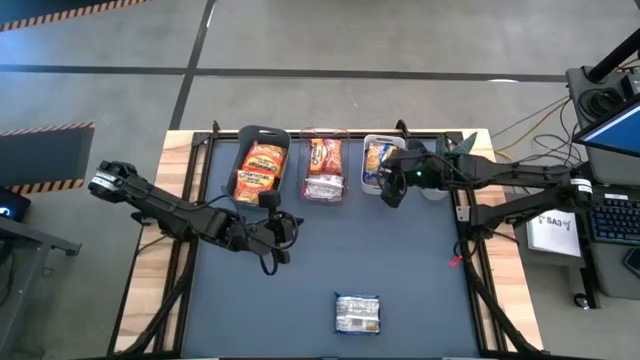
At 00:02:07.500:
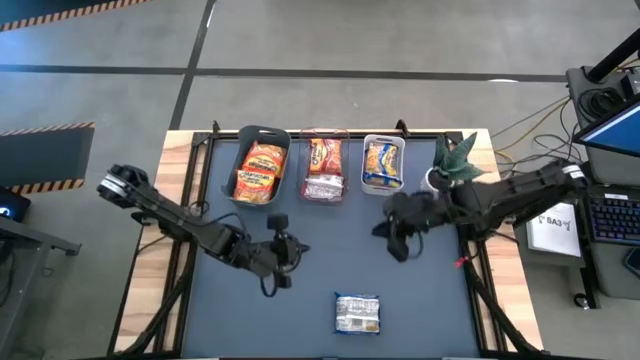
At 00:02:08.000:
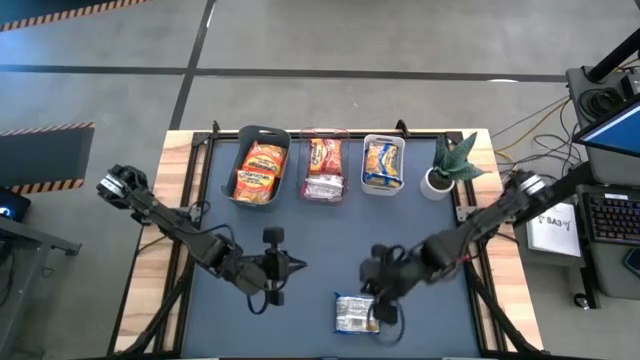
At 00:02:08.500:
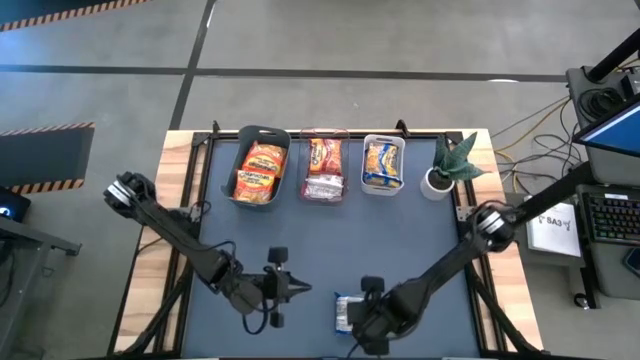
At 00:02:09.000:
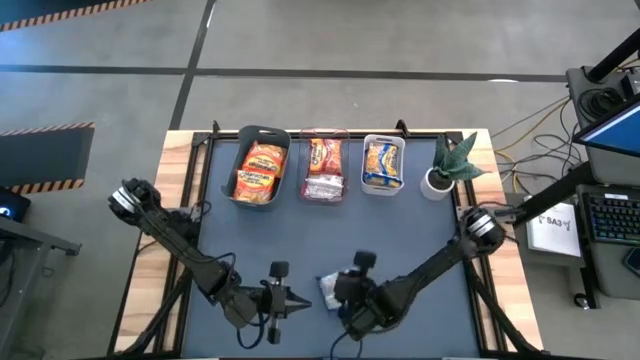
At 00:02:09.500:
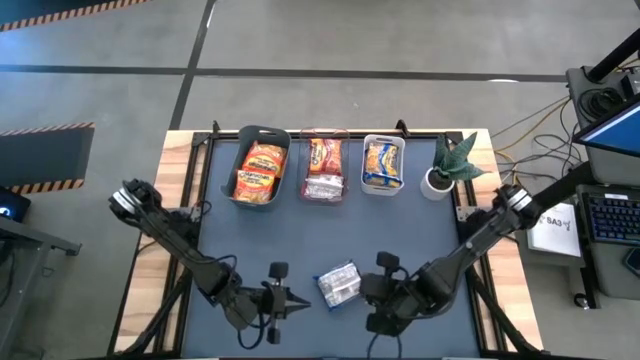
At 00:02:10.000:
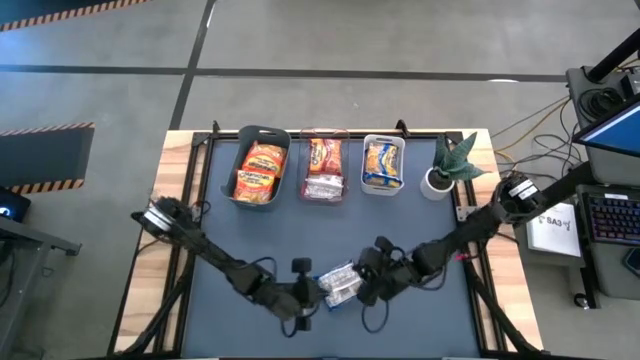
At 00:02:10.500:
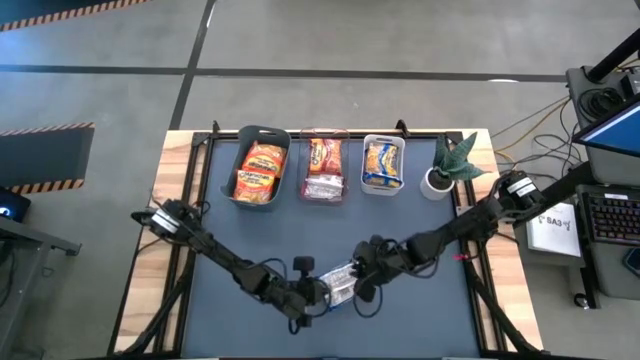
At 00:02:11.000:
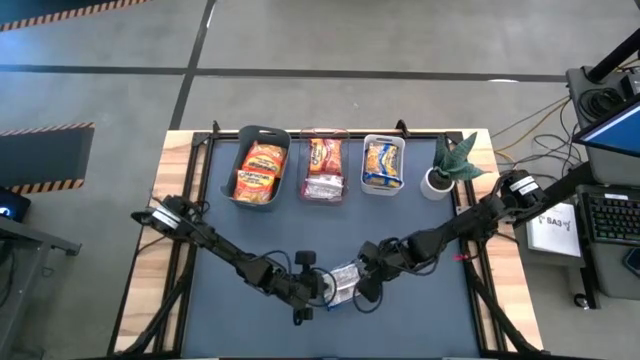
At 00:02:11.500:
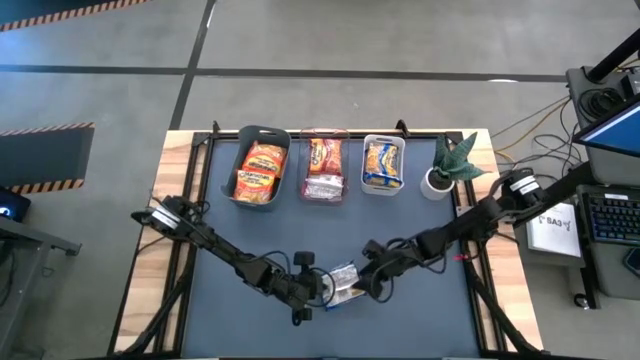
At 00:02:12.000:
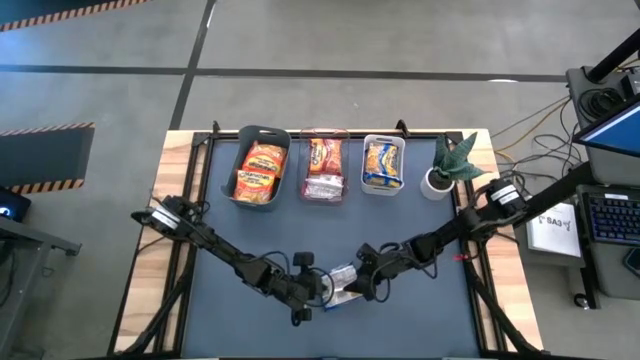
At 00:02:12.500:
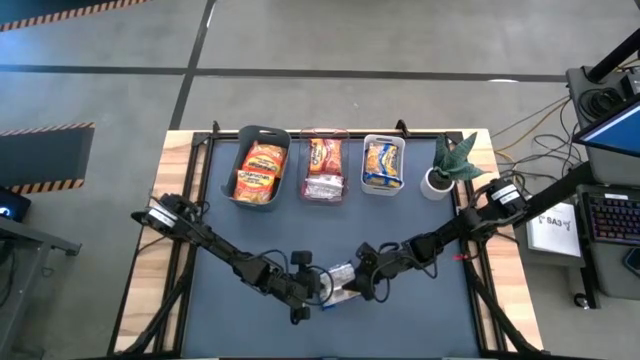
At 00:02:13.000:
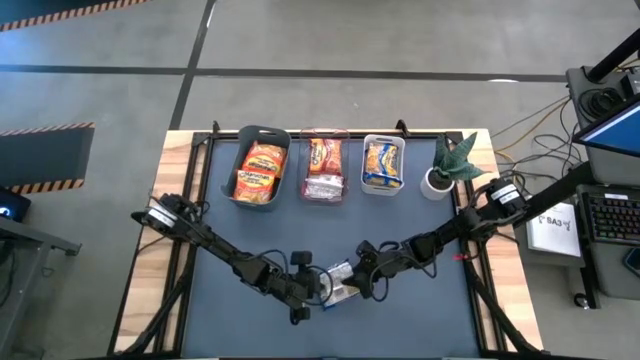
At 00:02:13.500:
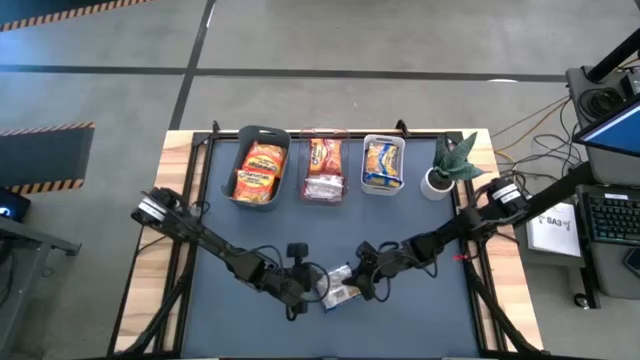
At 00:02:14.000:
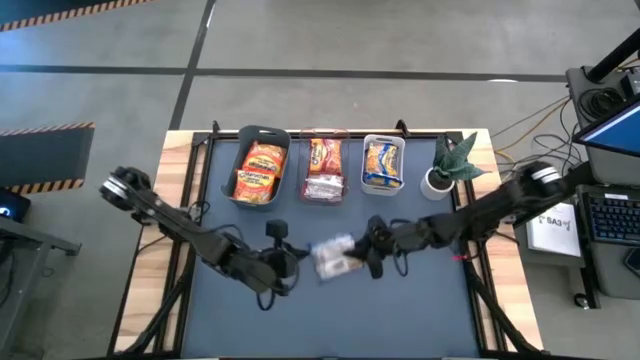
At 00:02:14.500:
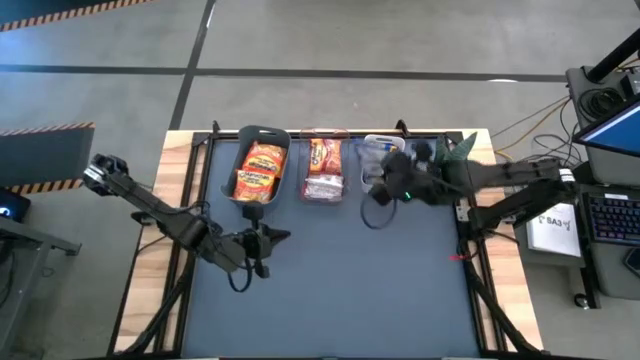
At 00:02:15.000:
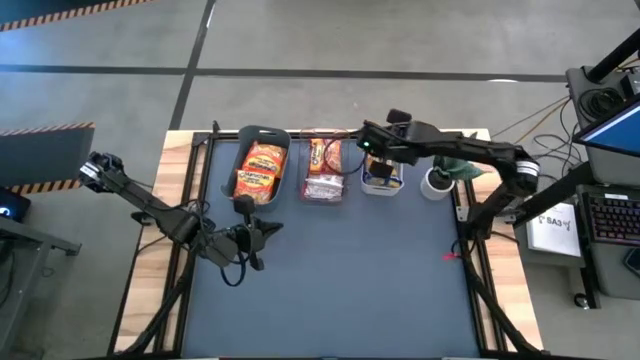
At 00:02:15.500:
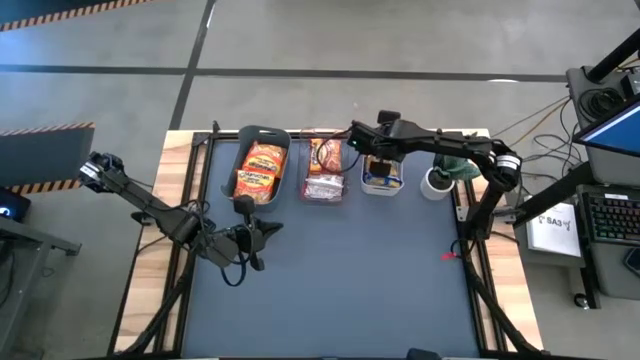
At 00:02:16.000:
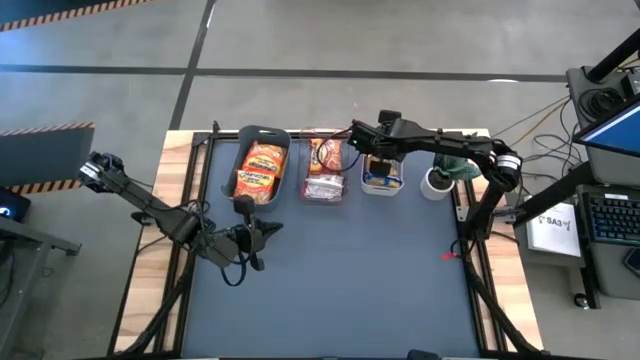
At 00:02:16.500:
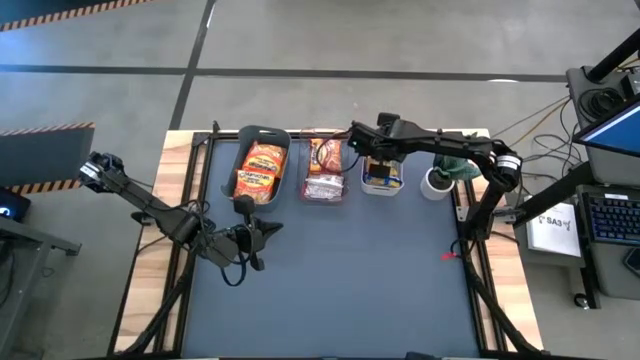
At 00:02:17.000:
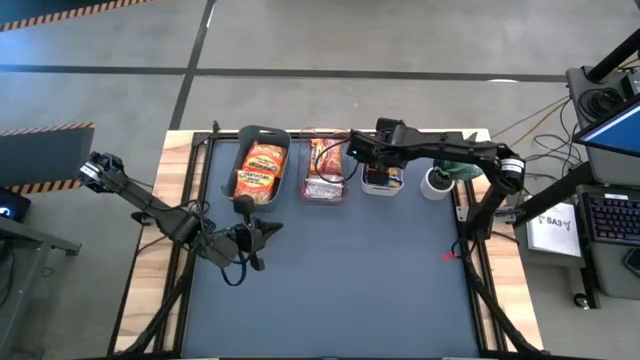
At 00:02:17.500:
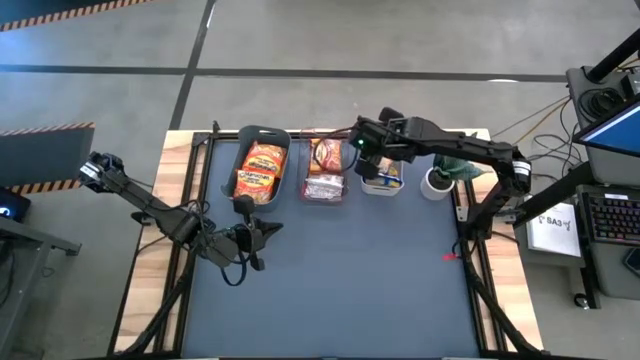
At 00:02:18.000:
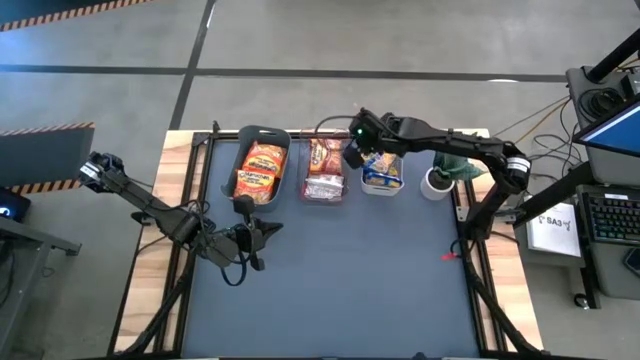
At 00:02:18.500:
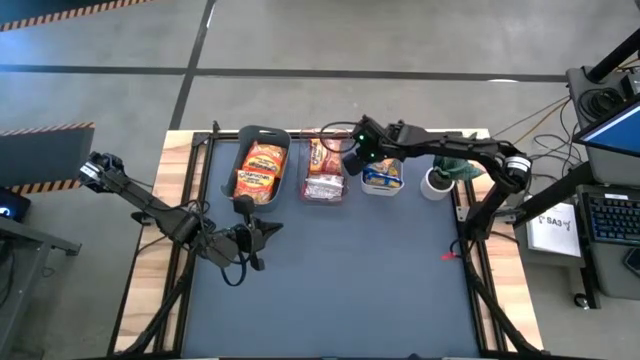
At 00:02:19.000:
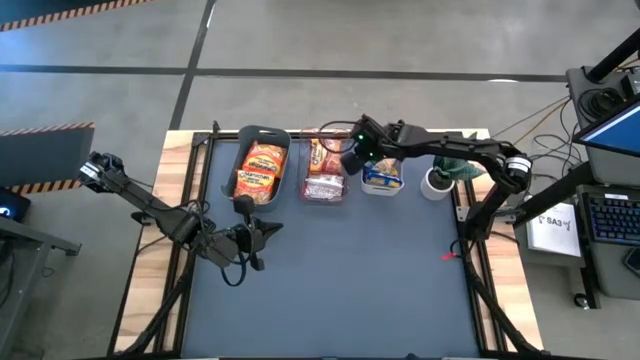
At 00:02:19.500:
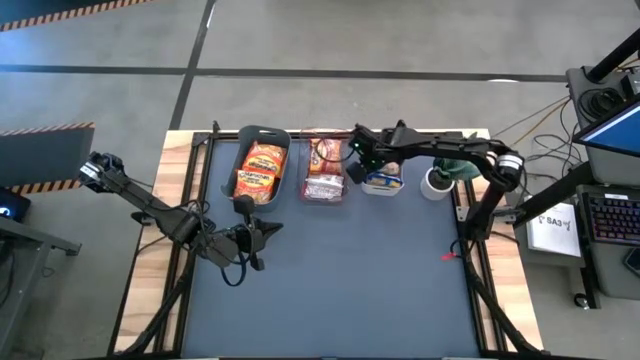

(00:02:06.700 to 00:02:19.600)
Task: Sort Maruchan noodles
Put the blue noodle pack into the white bin

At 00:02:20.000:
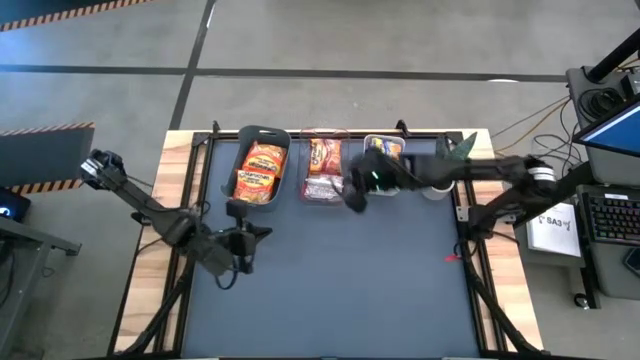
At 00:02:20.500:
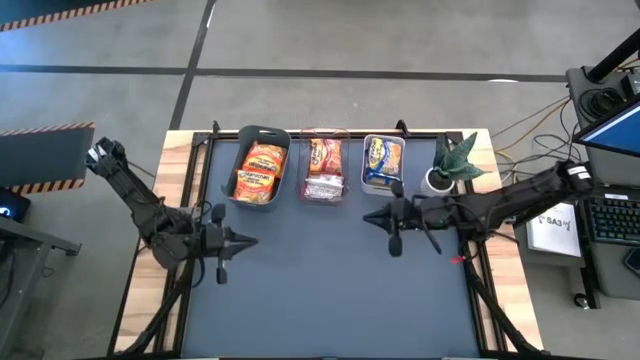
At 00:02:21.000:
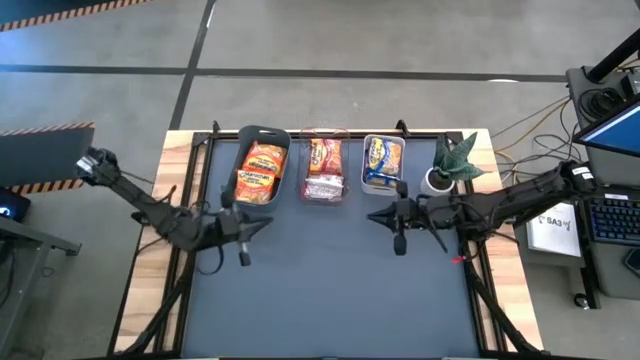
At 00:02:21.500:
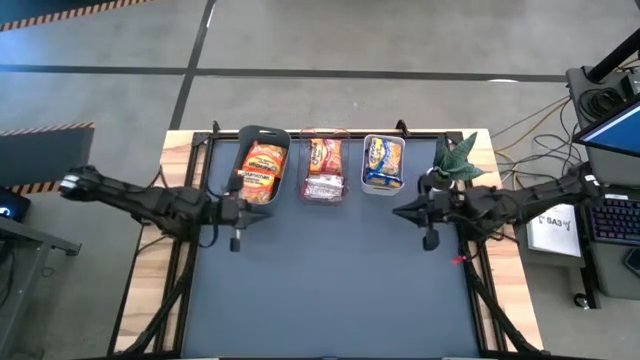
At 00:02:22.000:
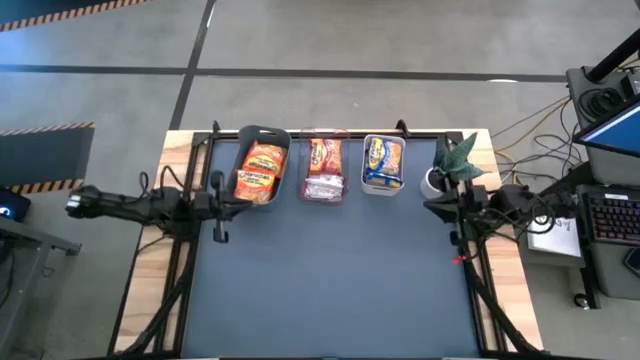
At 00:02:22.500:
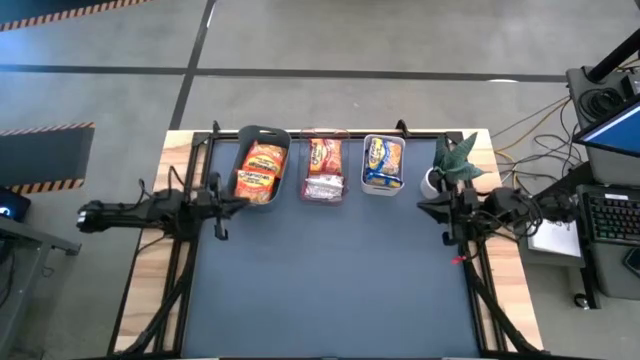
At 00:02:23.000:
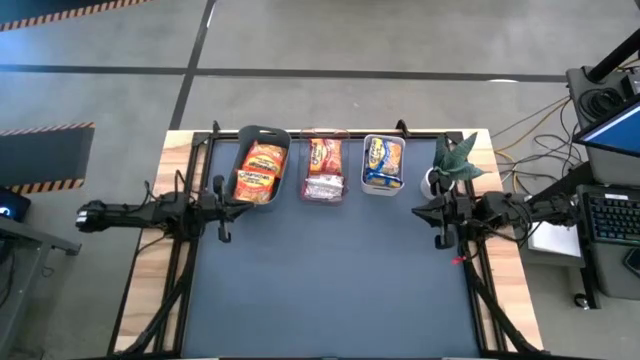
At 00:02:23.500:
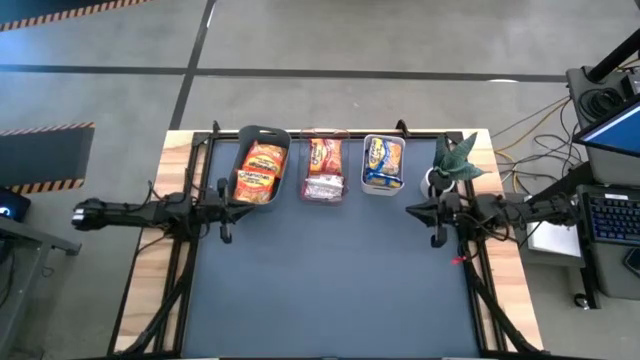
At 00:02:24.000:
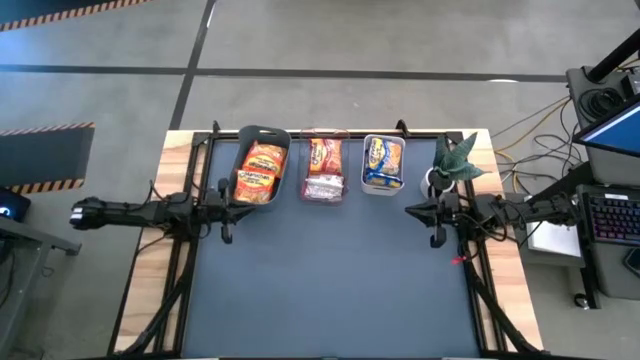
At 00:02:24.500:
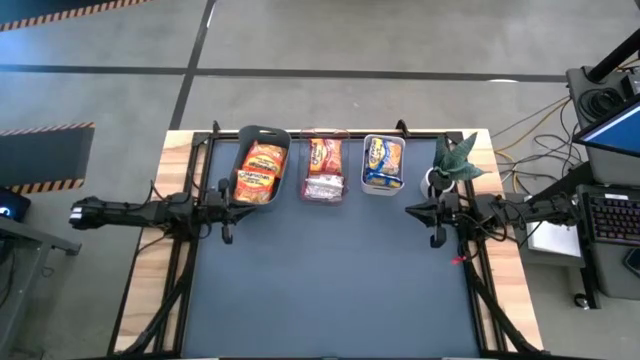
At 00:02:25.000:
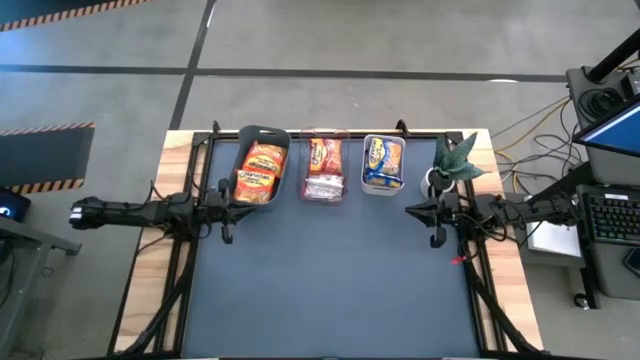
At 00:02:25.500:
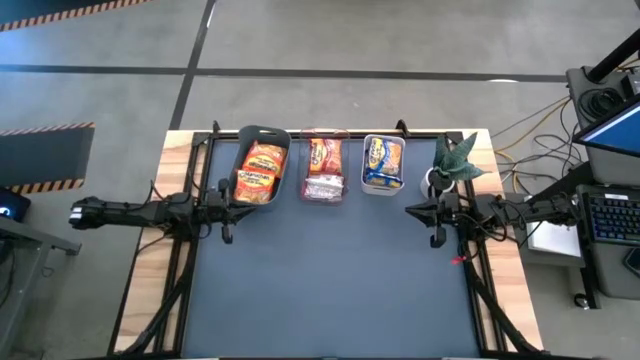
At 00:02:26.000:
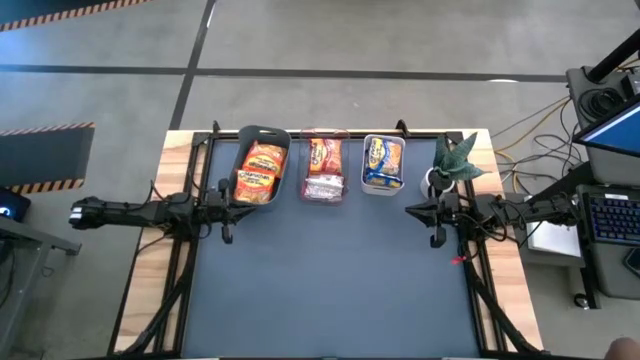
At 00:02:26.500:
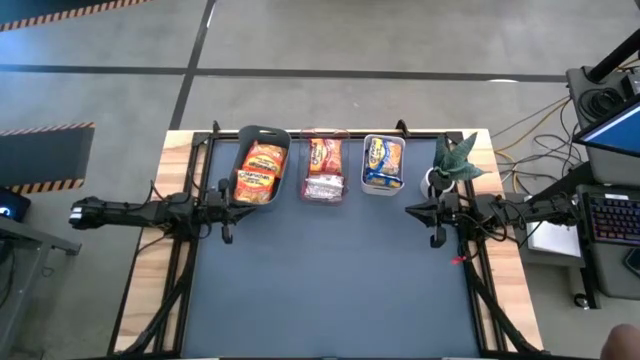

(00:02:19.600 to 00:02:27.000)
Return to Home Position
